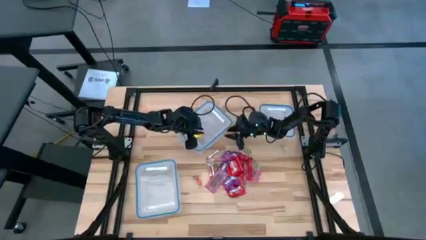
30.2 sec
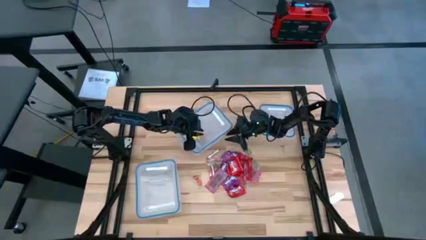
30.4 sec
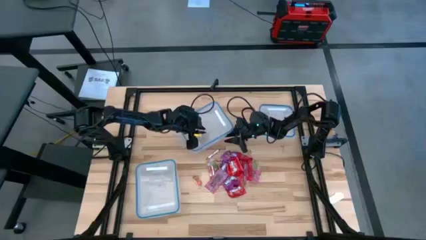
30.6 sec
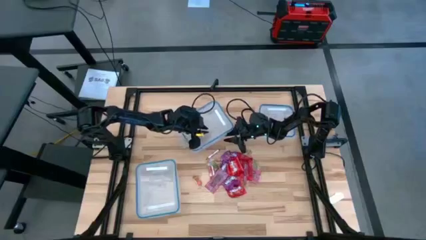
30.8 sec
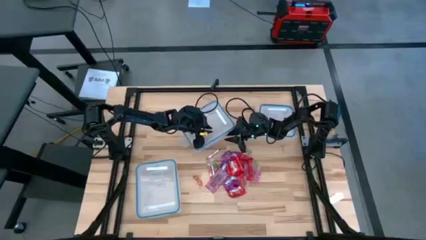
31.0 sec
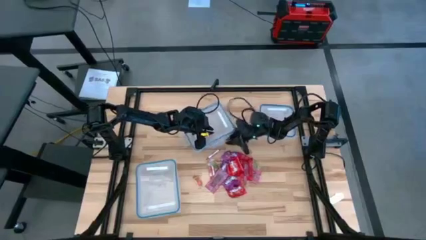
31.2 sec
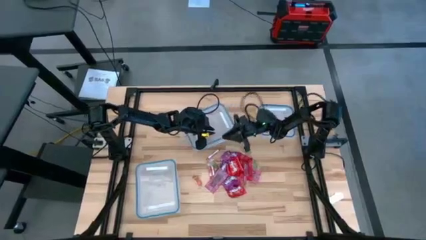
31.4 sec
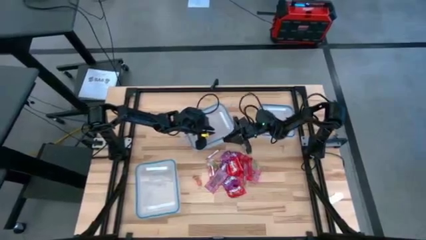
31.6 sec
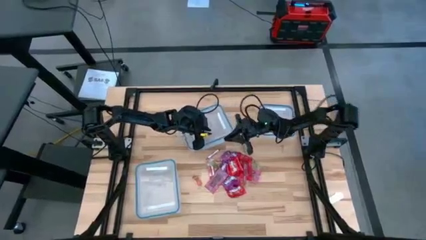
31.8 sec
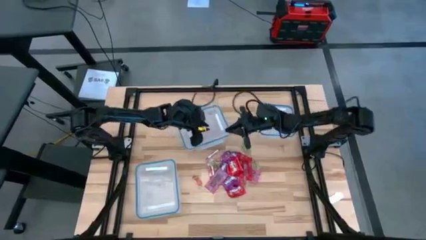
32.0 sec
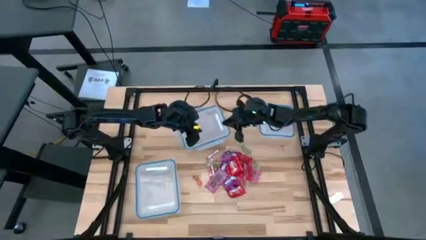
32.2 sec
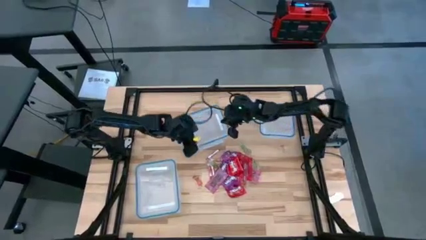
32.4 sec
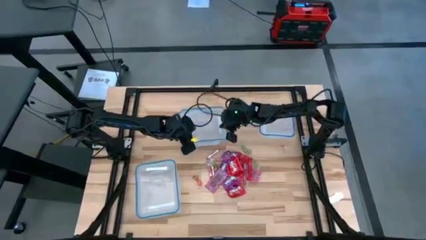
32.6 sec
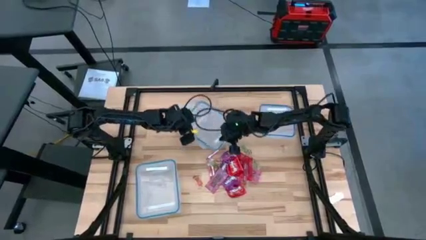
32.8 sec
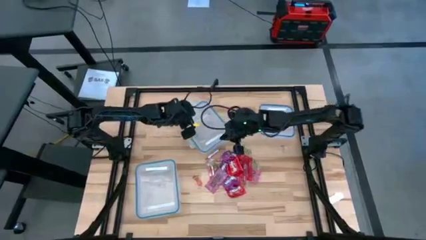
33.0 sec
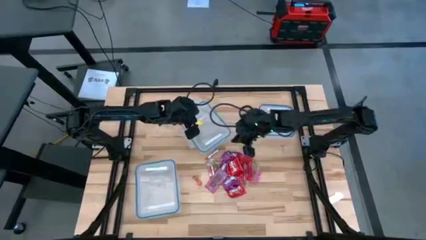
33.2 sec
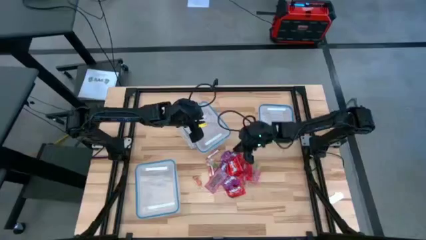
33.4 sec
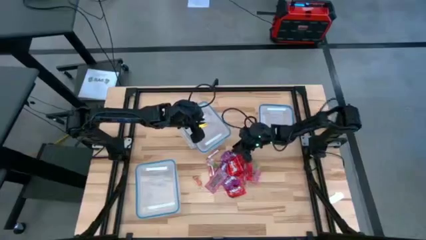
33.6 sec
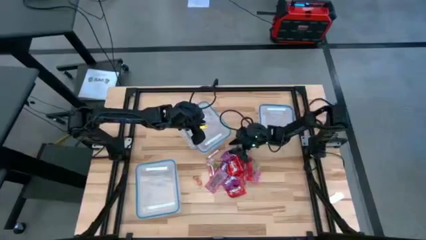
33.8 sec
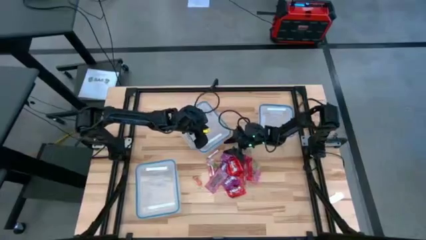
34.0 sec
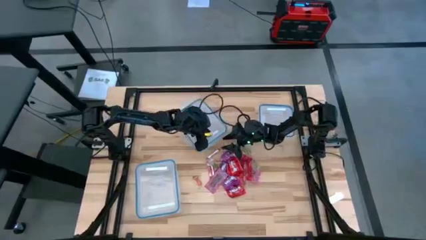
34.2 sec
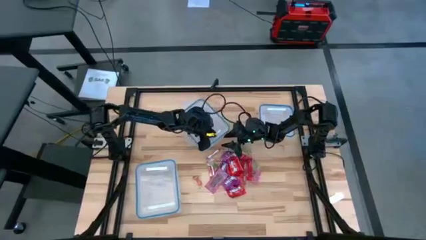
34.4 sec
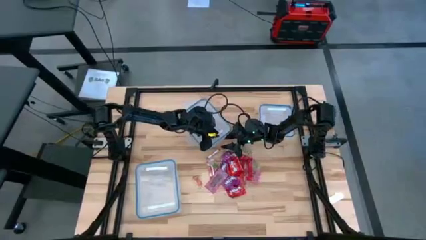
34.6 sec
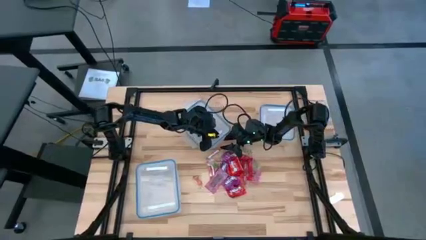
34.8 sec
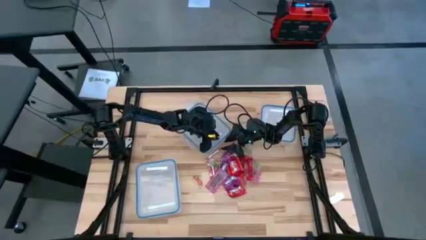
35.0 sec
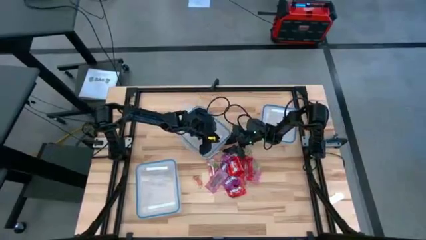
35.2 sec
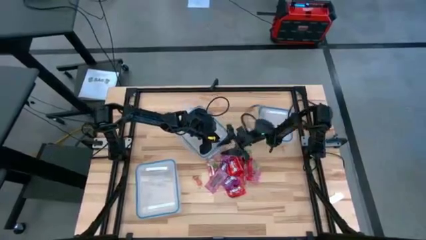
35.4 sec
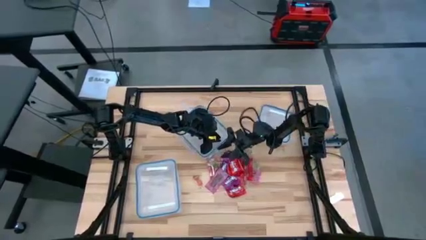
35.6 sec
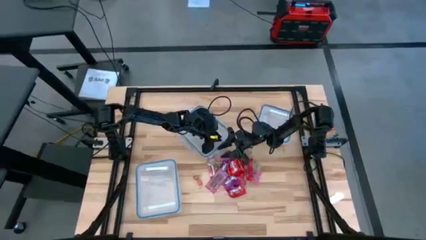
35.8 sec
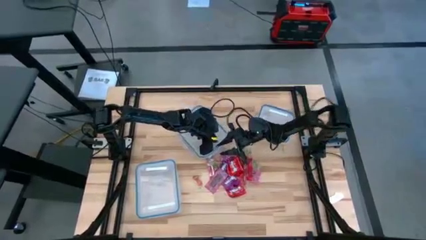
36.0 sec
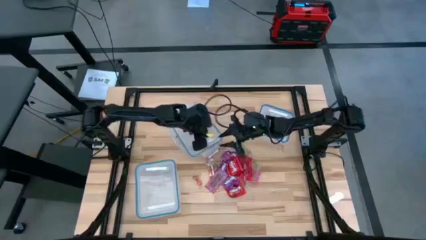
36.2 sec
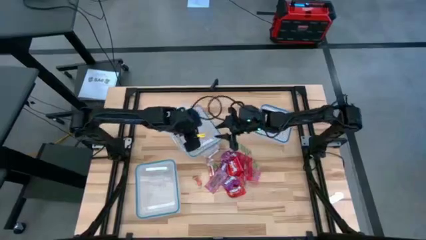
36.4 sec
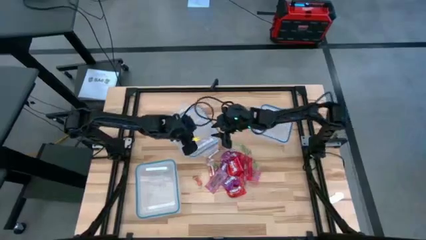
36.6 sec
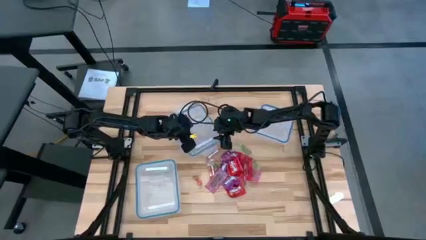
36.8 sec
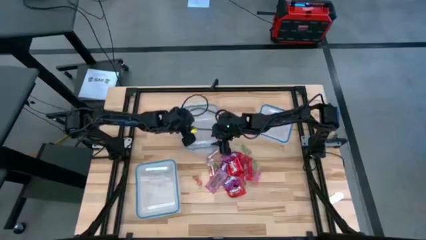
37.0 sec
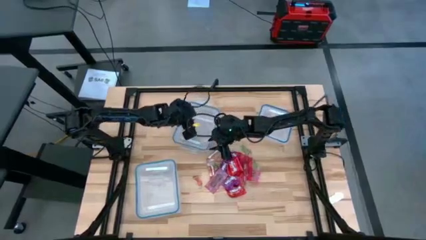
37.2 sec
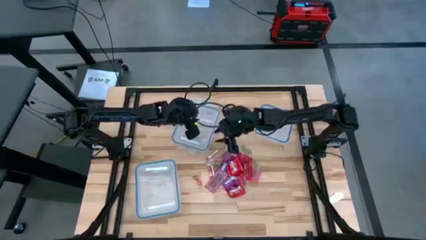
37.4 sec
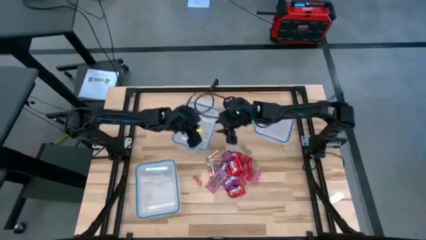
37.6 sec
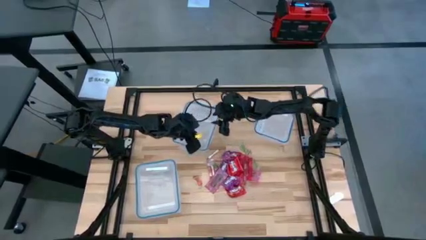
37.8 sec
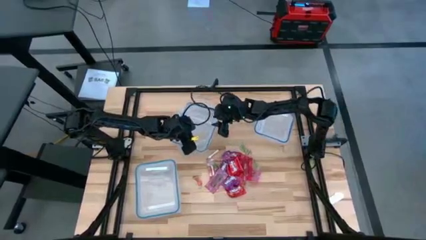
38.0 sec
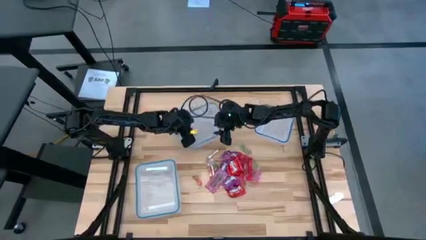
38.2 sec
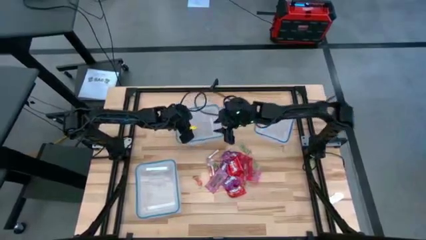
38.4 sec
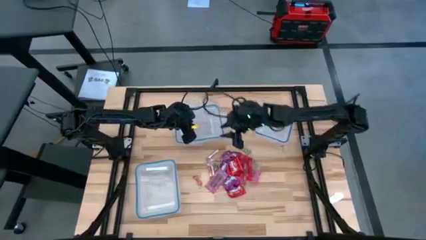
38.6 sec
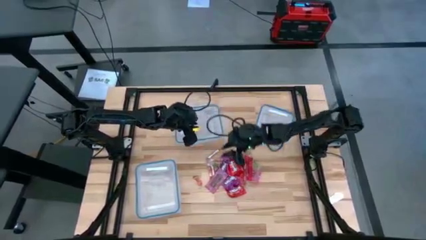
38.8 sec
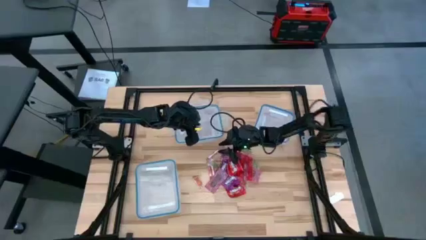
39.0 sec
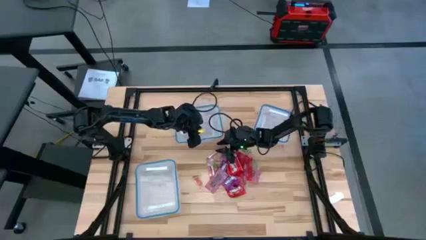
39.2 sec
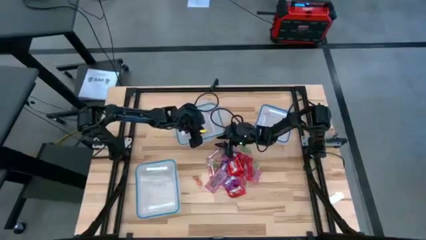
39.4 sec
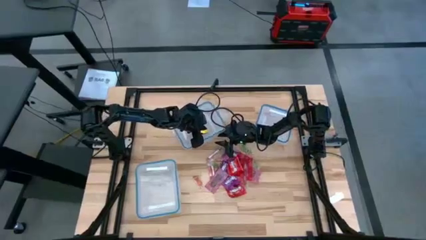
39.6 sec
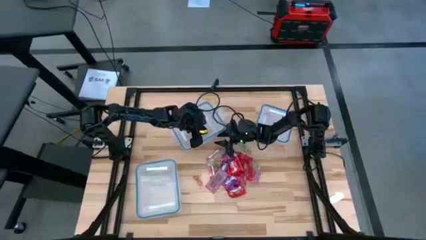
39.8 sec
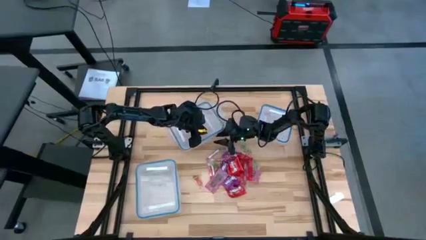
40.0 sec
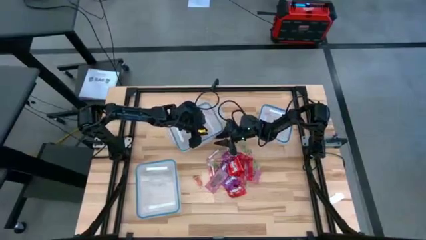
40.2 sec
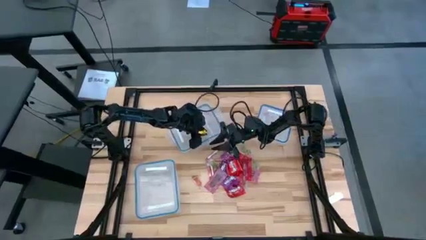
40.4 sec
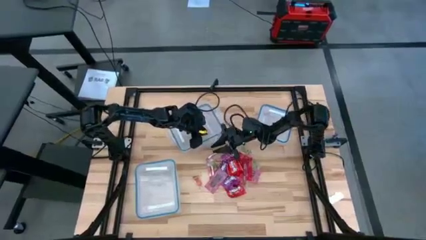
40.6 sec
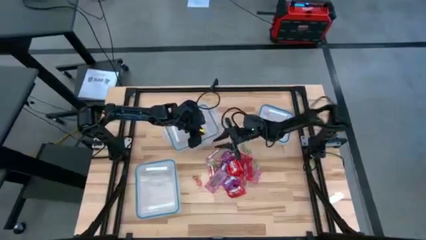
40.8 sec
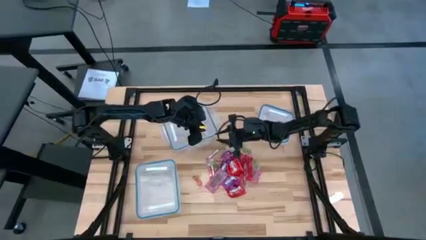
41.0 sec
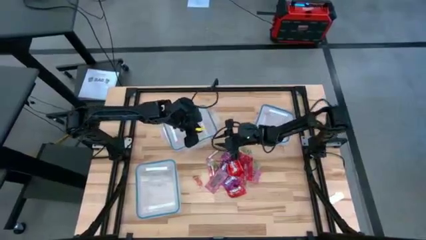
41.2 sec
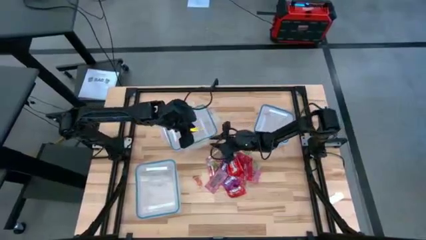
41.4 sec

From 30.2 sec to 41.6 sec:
Task: Sort candy
Open the top left transparent bin
